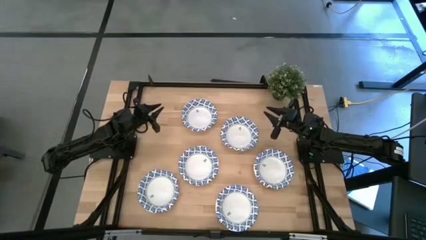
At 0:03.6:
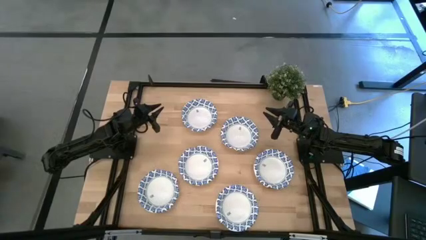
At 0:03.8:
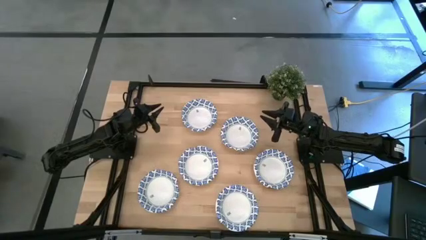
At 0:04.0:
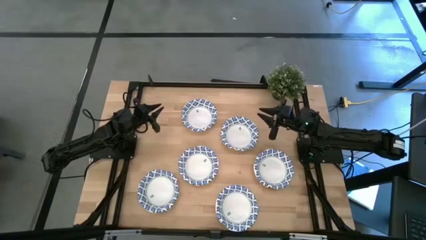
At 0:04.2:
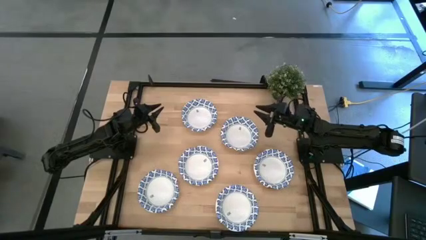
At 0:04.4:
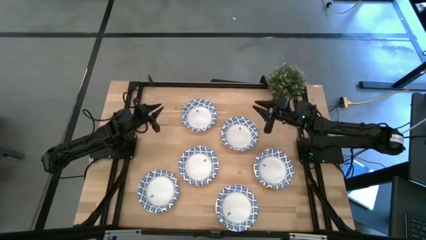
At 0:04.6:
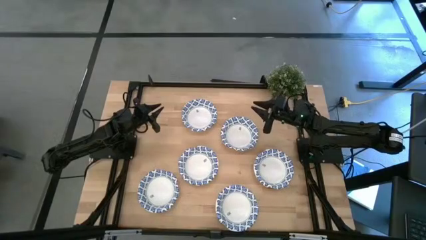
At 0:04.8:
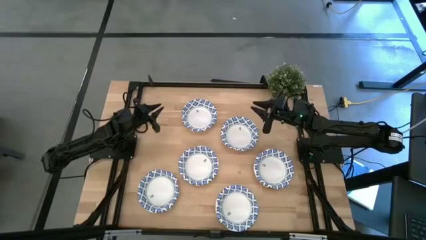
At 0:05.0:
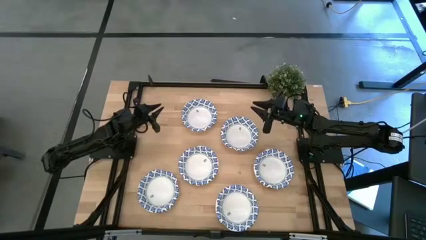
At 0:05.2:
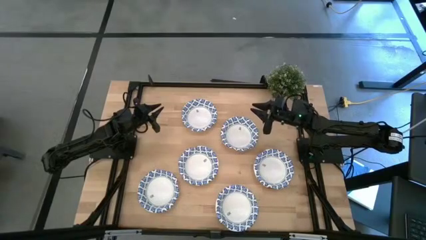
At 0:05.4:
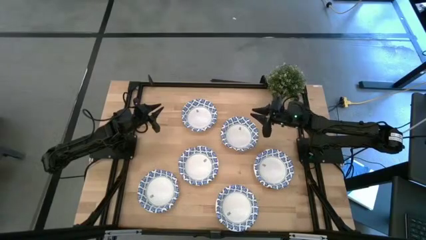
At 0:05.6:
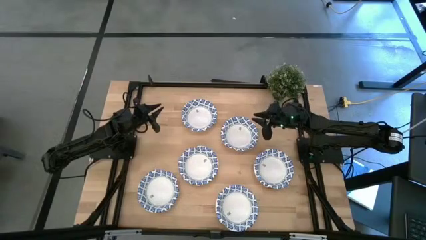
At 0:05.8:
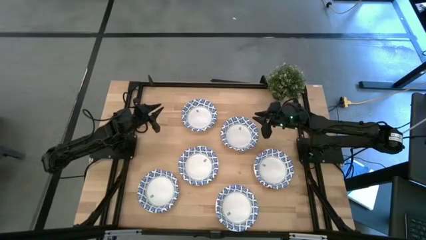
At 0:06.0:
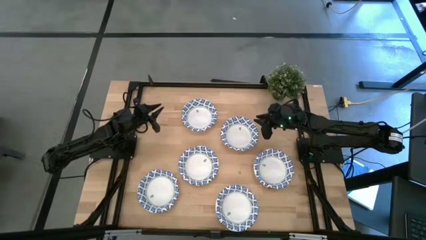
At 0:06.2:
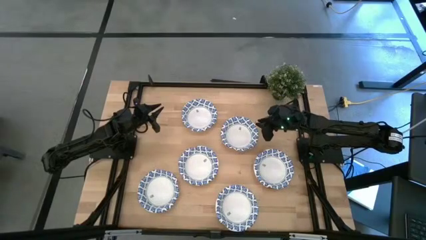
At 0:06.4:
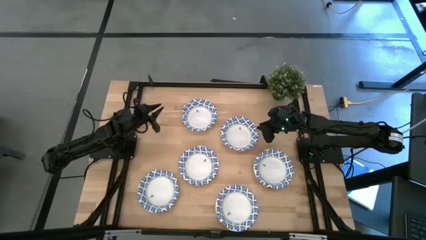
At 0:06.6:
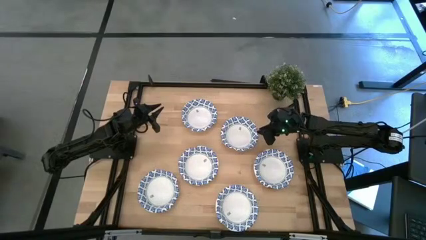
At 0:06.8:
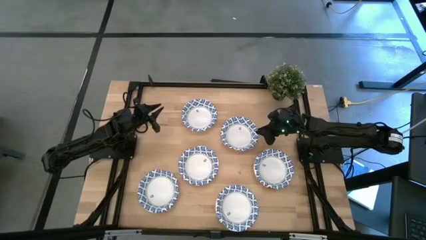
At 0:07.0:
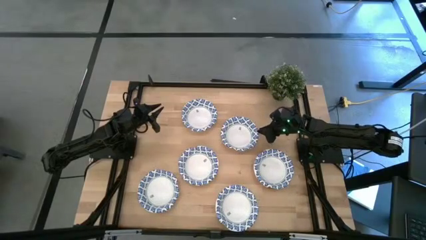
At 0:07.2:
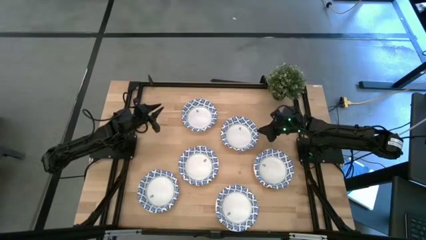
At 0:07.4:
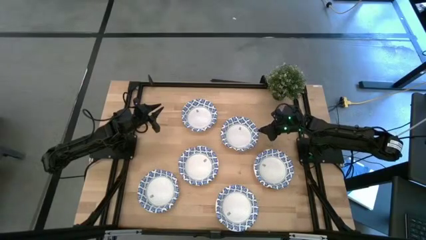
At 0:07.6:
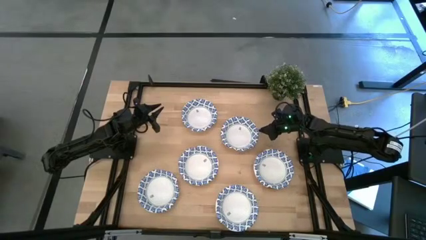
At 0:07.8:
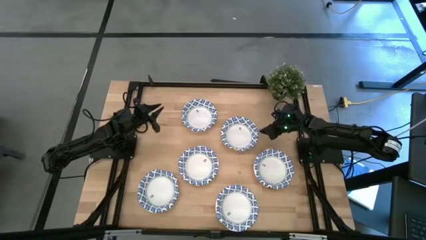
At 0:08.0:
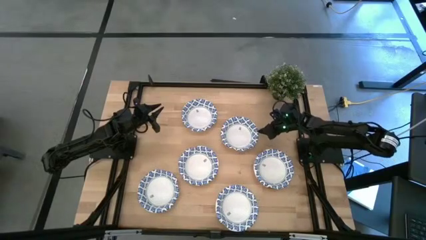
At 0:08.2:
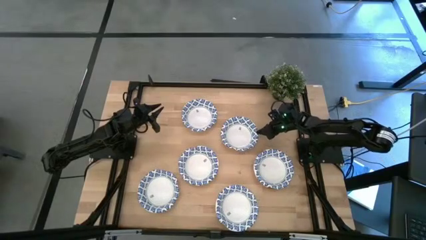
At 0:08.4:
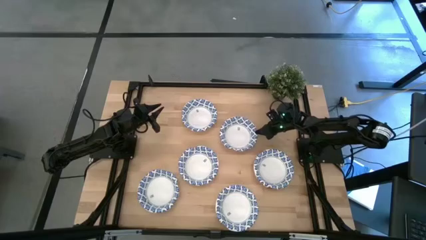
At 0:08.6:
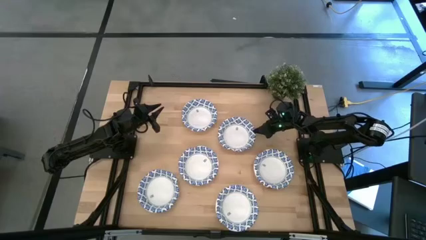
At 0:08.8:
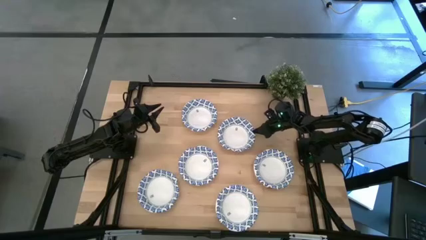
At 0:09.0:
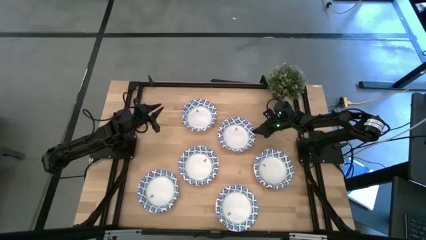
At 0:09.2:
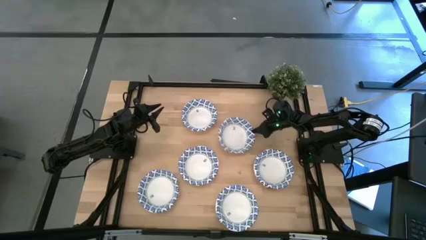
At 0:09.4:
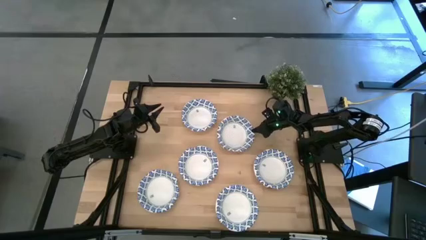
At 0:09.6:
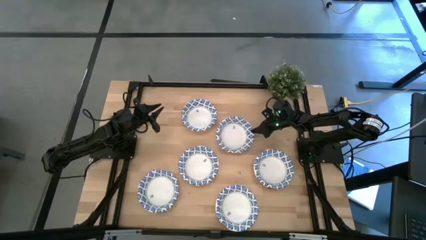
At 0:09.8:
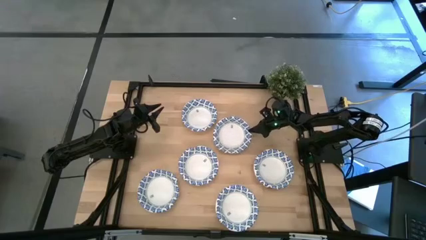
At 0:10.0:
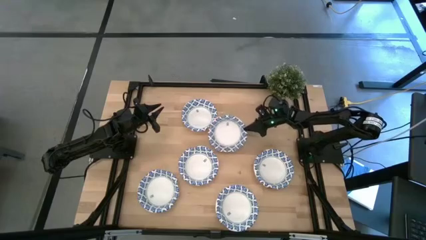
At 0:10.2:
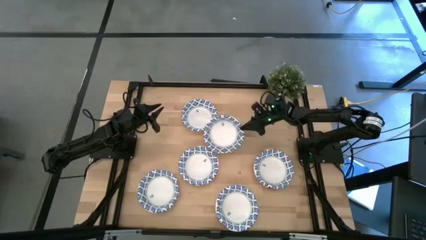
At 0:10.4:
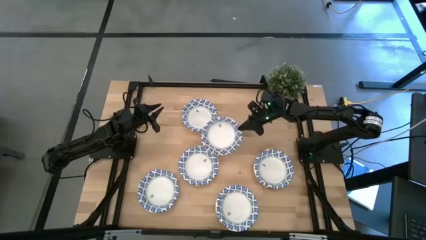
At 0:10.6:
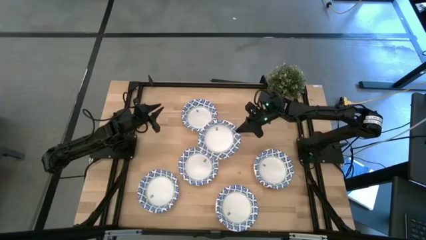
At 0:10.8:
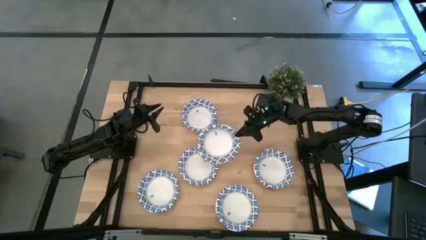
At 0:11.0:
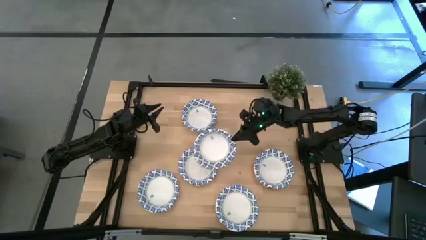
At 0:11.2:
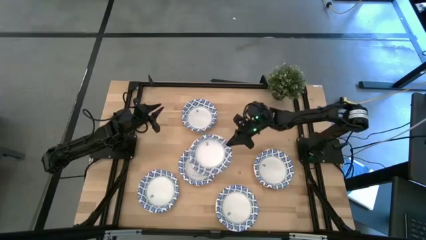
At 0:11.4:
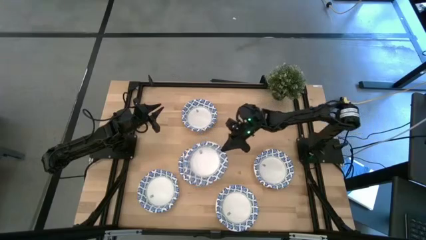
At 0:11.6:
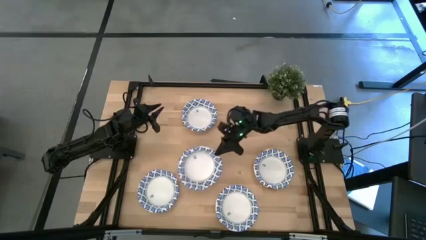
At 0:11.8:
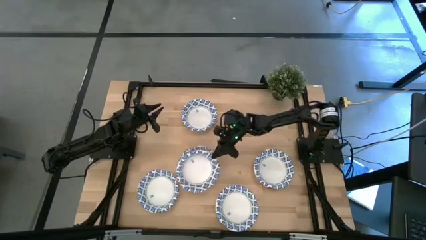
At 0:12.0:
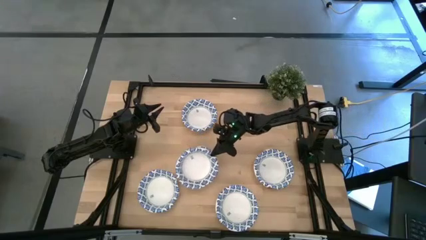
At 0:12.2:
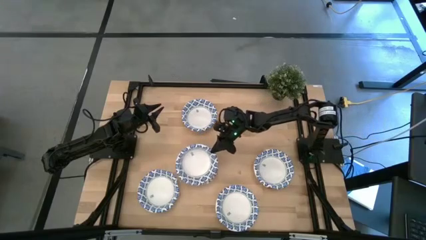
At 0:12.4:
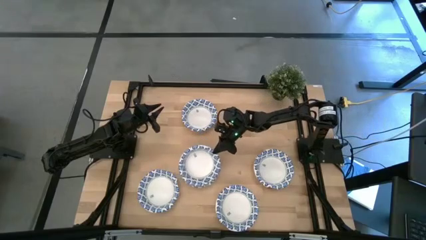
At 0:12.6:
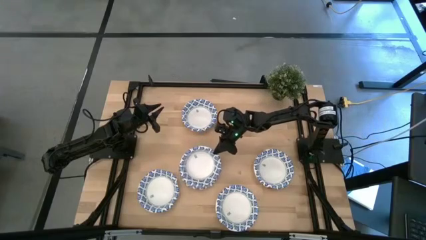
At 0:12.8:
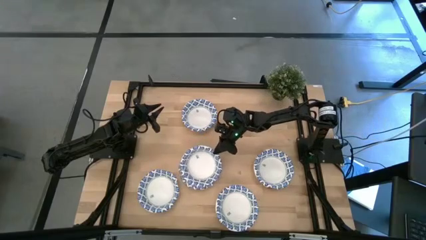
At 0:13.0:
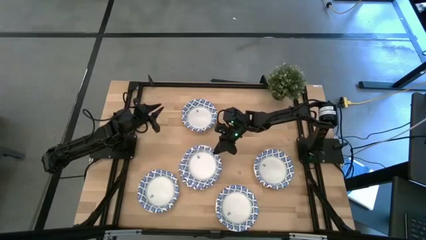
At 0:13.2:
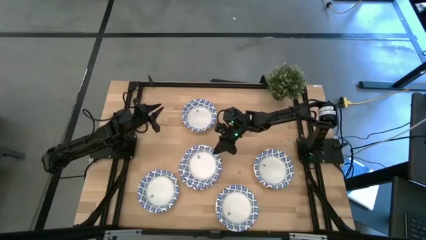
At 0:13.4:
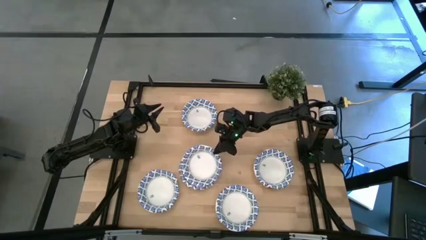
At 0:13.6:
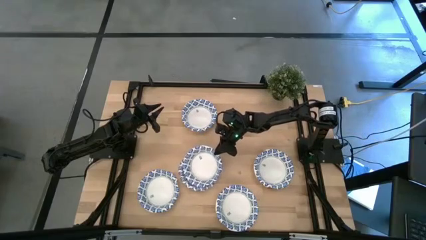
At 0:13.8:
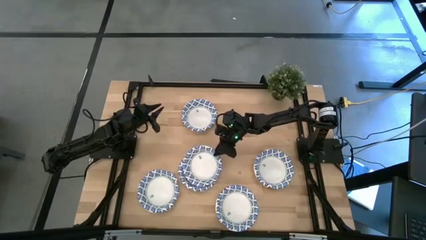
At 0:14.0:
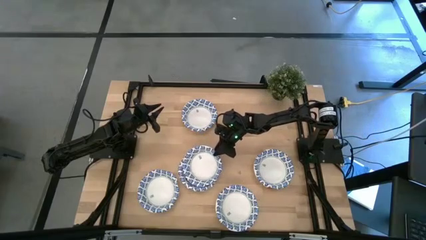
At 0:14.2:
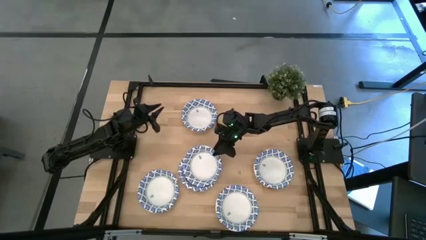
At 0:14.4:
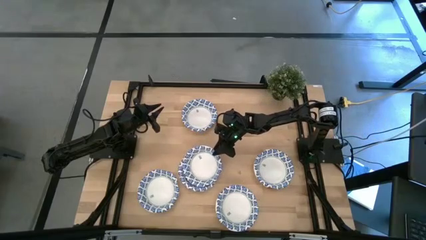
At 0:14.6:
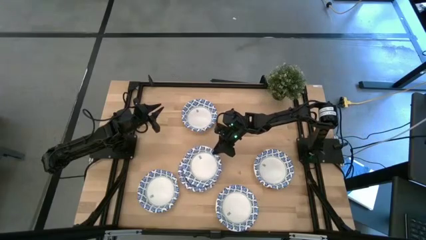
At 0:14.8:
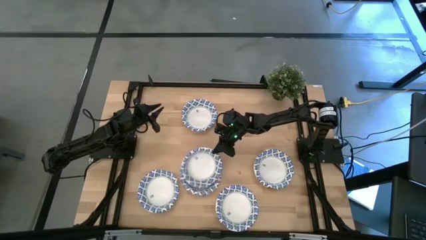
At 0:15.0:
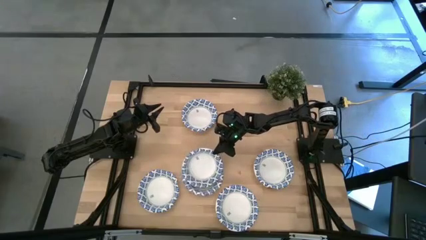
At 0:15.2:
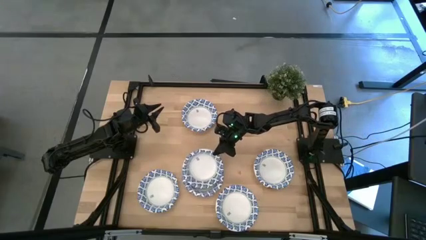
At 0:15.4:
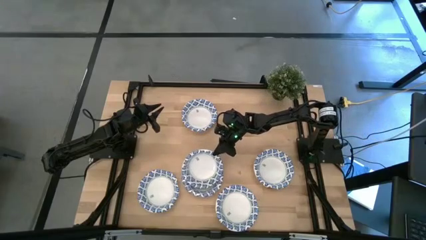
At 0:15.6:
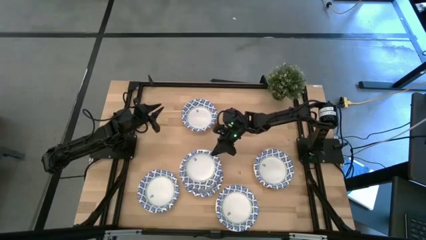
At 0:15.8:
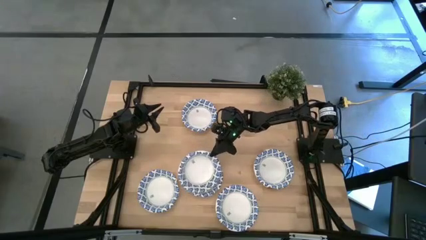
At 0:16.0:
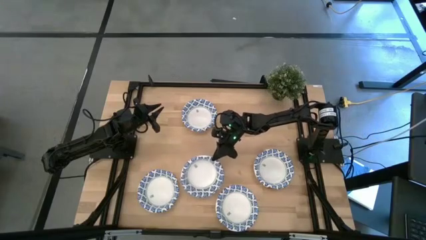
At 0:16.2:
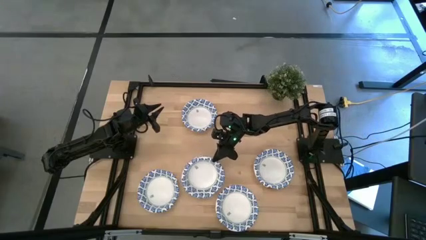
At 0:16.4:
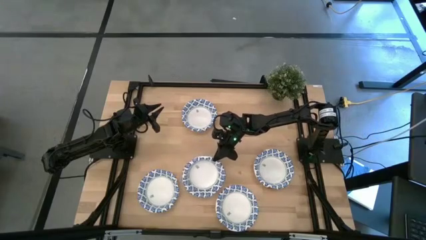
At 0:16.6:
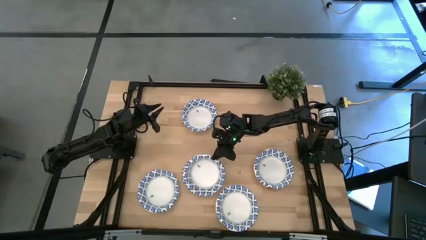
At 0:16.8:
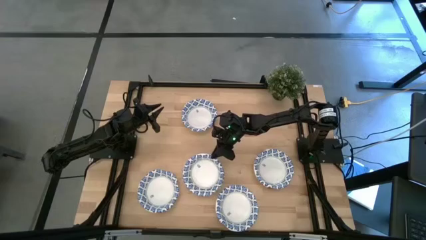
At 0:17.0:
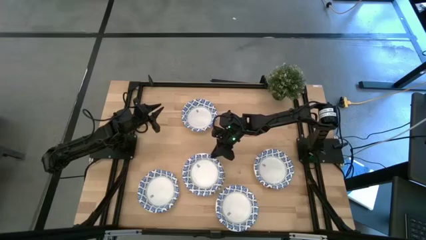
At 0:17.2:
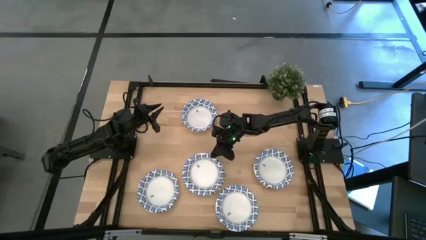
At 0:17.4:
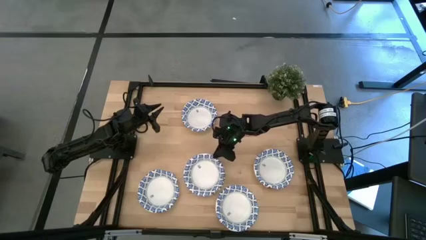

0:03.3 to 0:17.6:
Task: Nest bowls inside each other
Stack the blue bowl on top of the blue bowl

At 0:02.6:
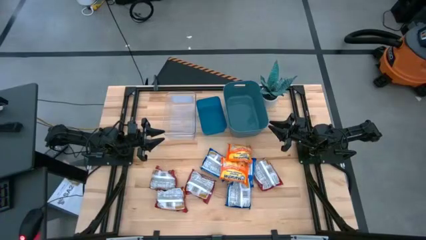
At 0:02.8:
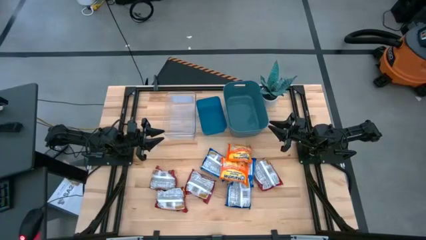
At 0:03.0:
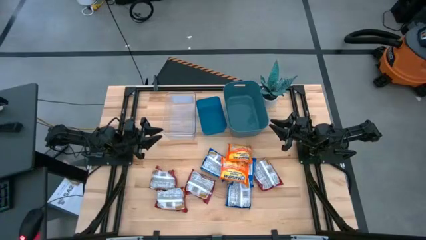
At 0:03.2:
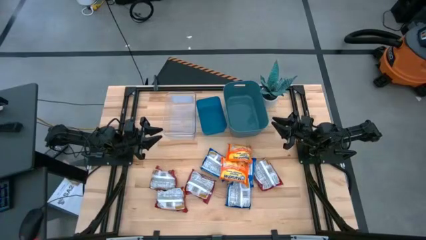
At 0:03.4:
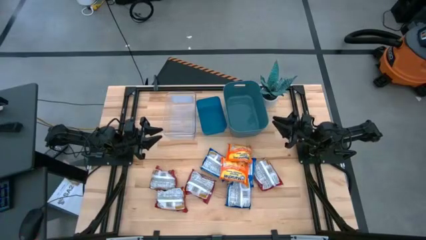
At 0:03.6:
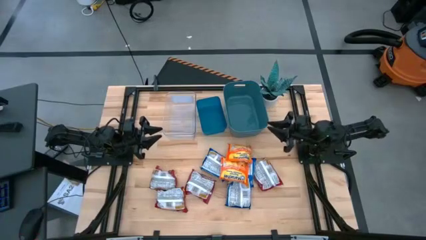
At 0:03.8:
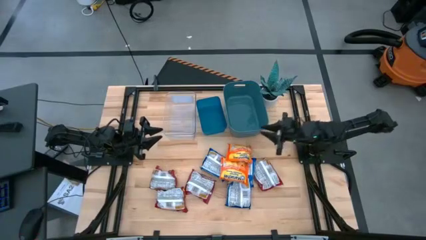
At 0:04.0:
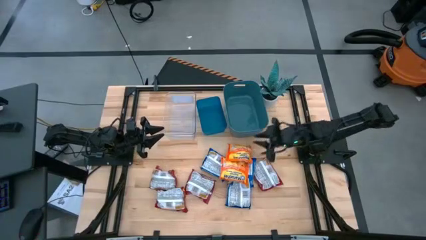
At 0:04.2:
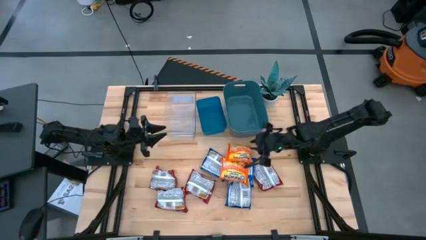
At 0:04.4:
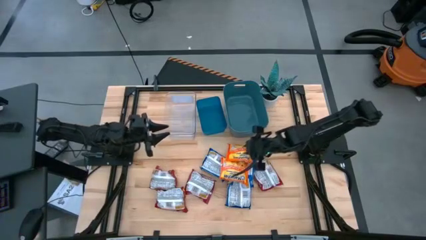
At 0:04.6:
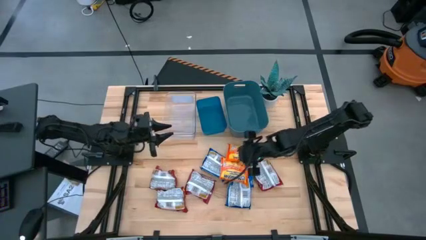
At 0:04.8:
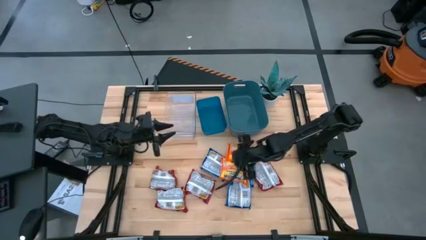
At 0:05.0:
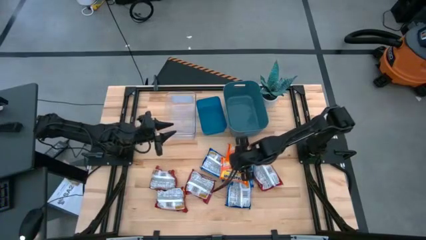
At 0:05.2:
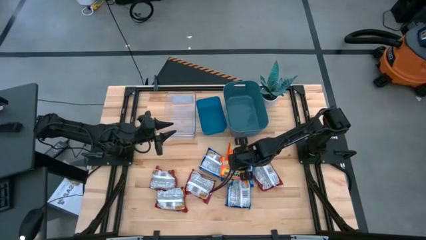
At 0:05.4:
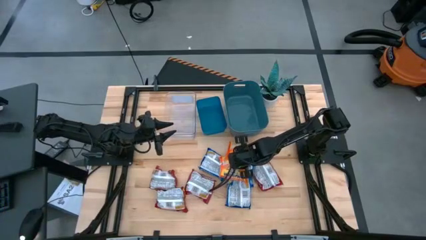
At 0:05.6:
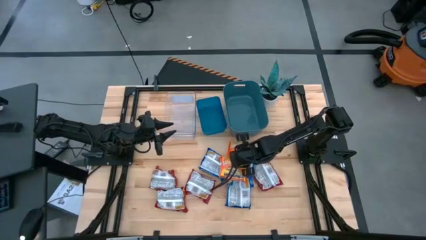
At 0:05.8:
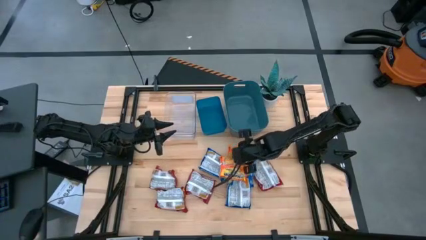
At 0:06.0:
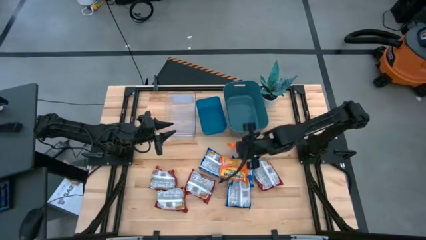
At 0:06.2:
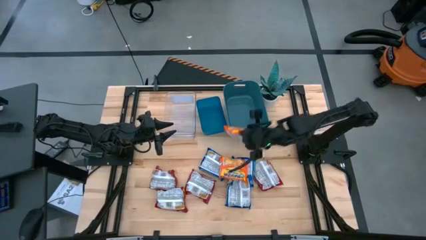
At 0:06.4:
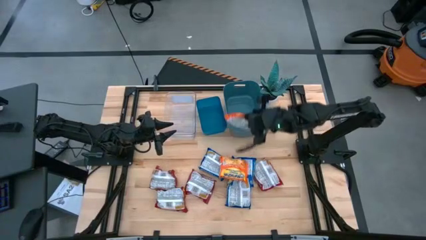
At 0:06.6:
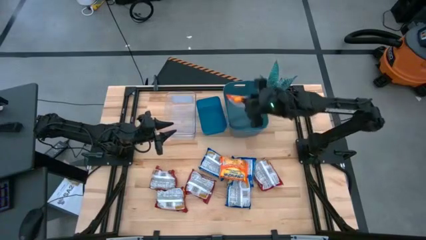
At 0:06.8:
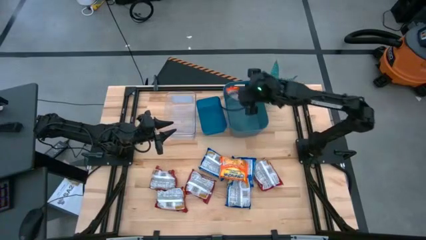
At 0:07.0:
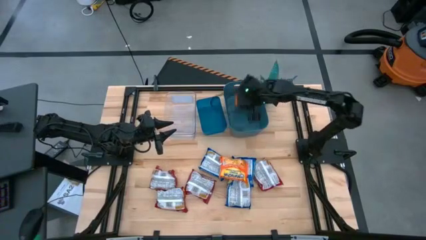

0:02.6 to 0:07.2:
Task: Sort Maruchan noodles
Put the orange noodle pack into the green bin
